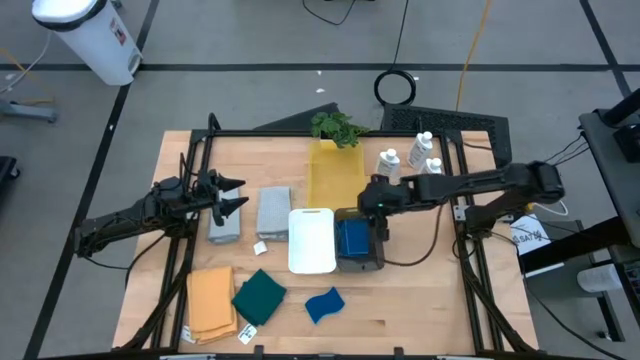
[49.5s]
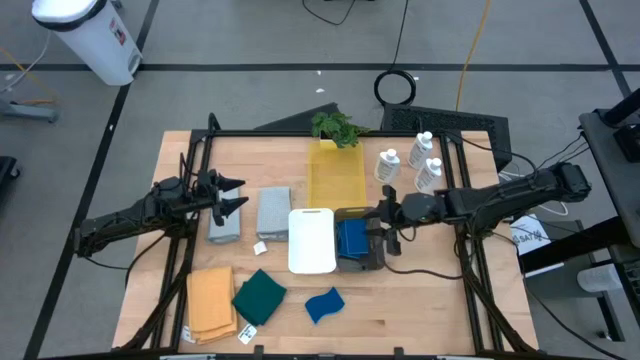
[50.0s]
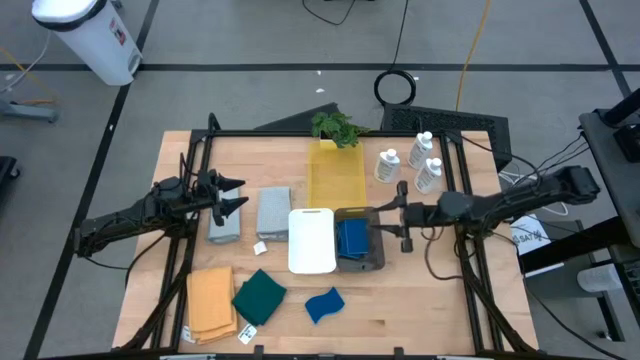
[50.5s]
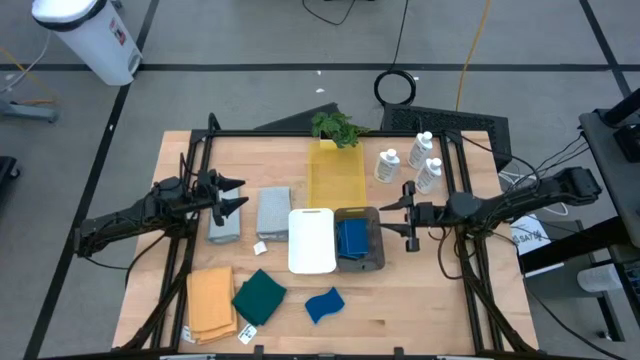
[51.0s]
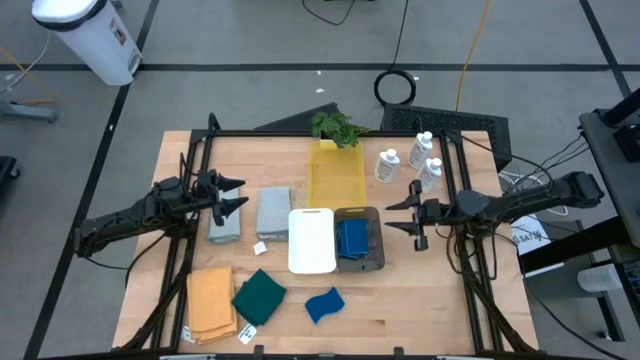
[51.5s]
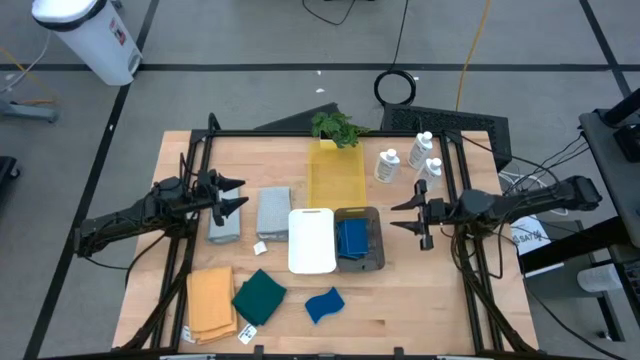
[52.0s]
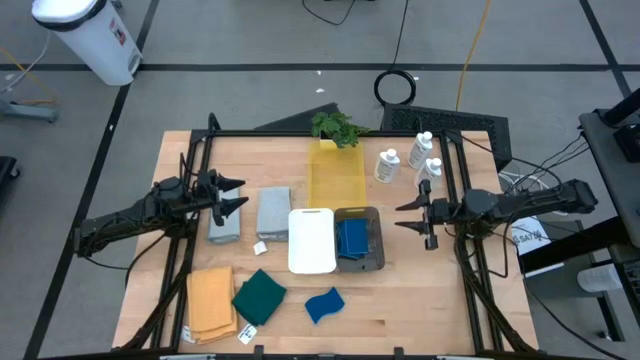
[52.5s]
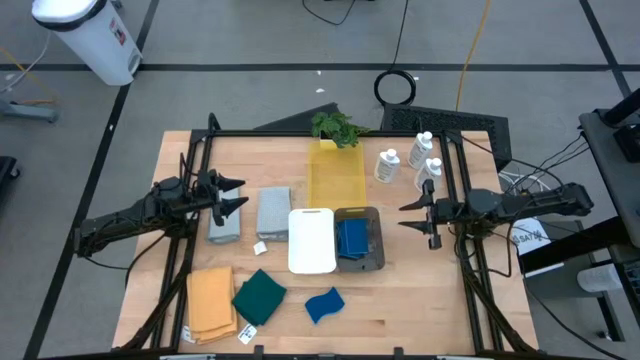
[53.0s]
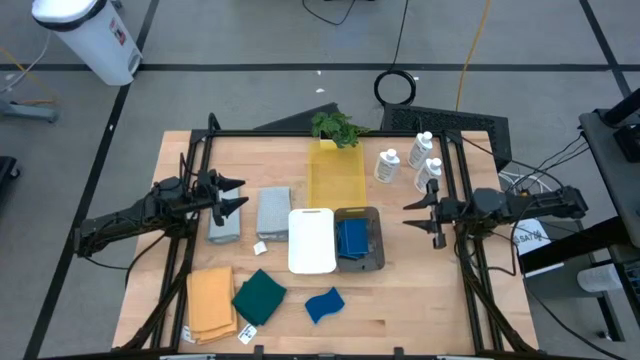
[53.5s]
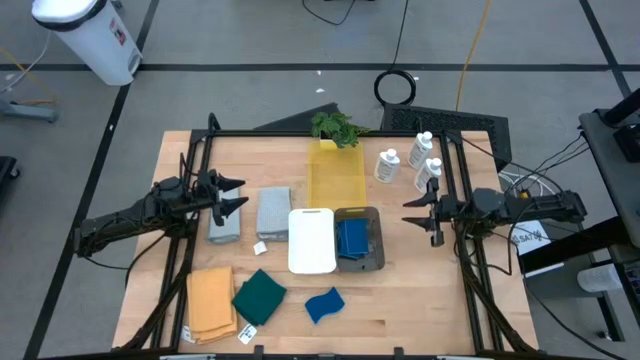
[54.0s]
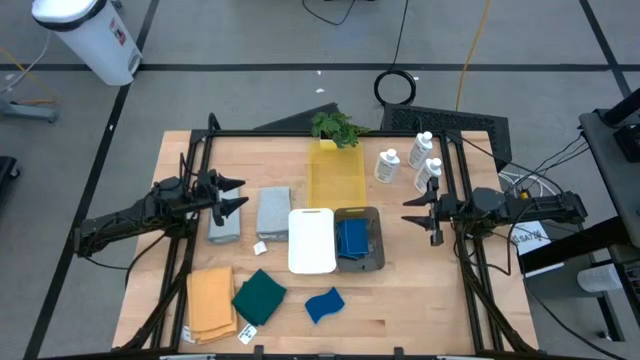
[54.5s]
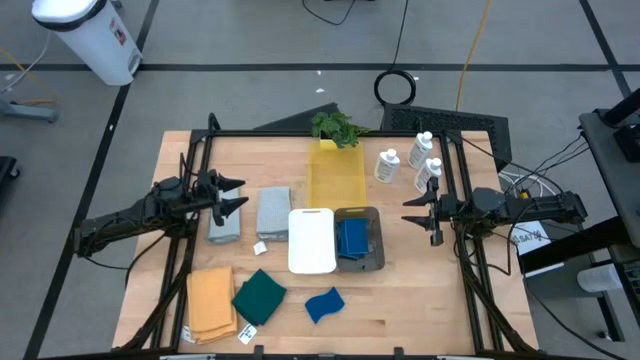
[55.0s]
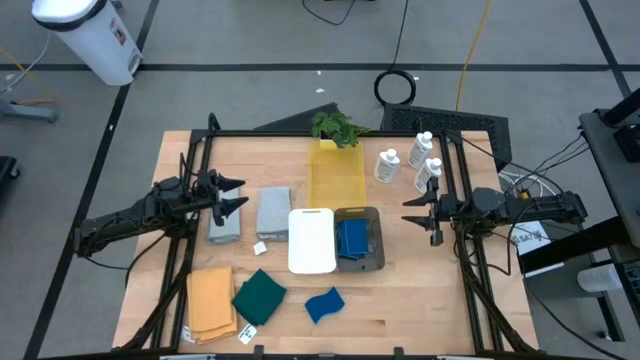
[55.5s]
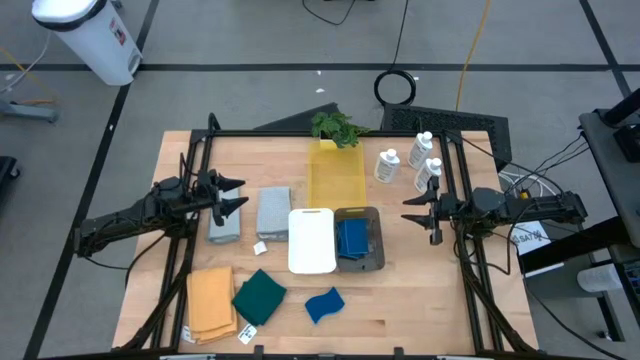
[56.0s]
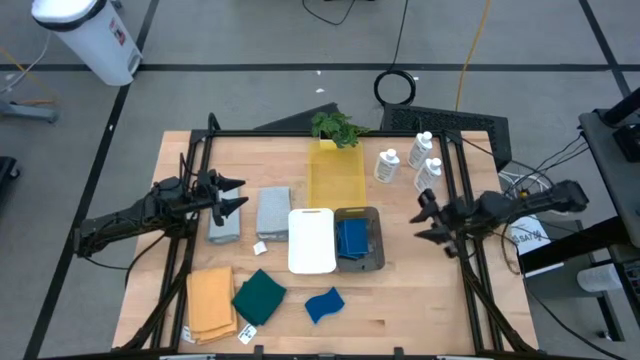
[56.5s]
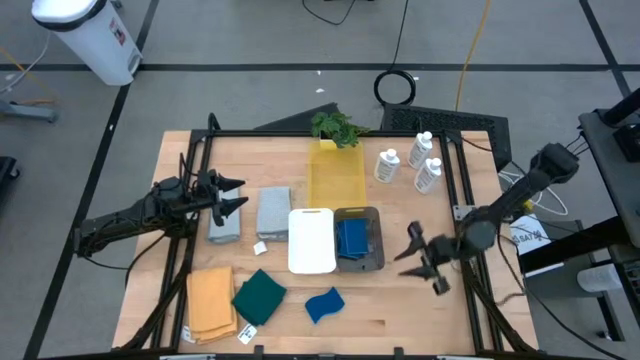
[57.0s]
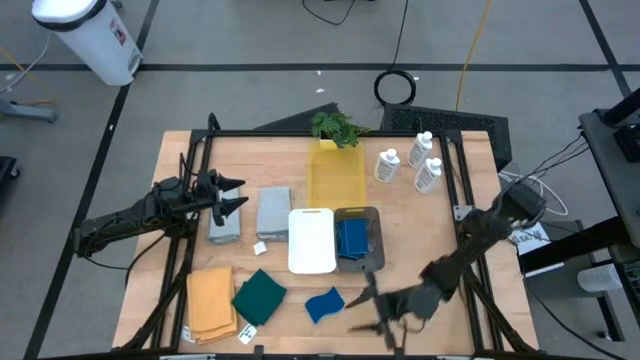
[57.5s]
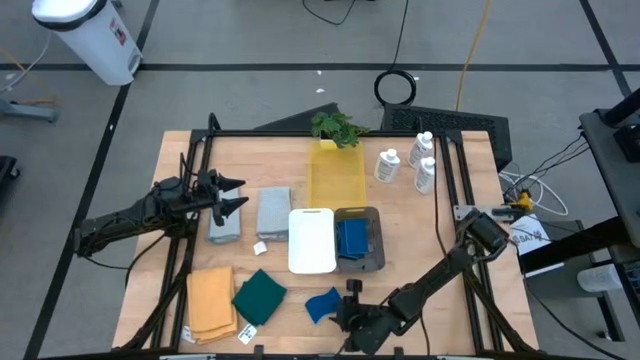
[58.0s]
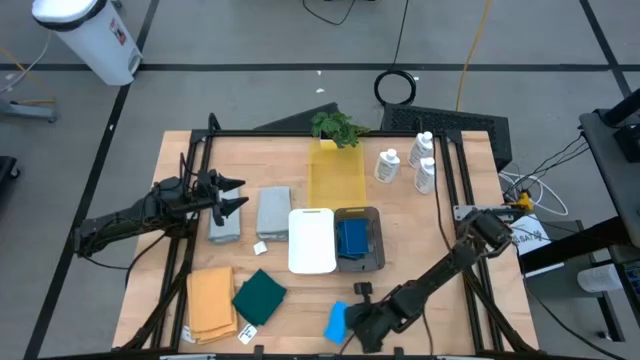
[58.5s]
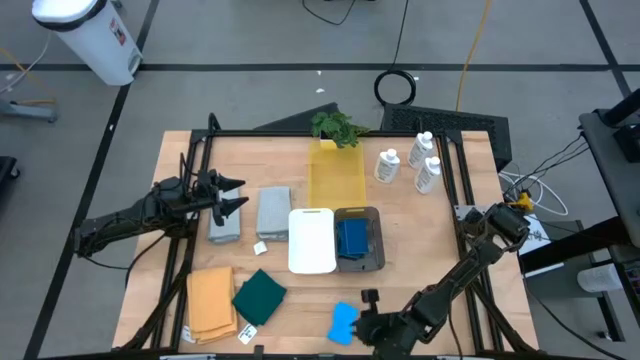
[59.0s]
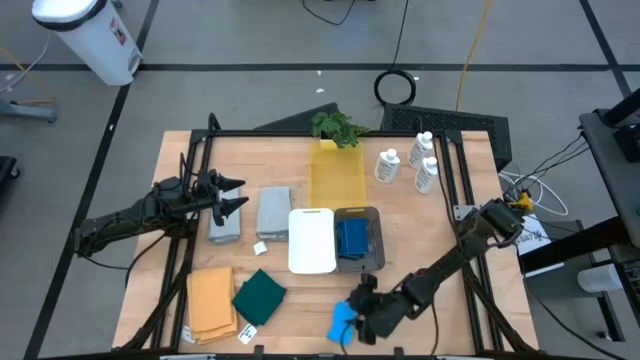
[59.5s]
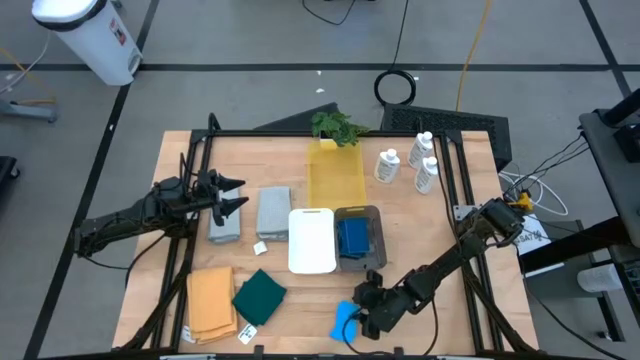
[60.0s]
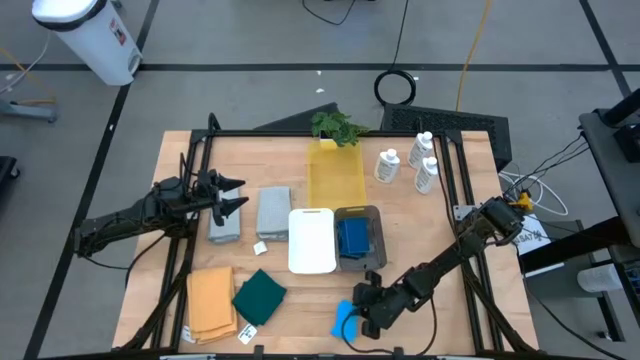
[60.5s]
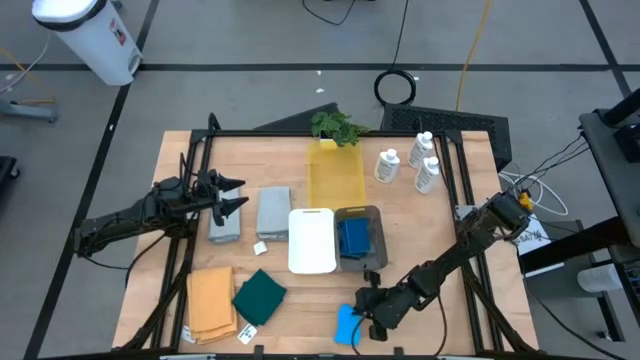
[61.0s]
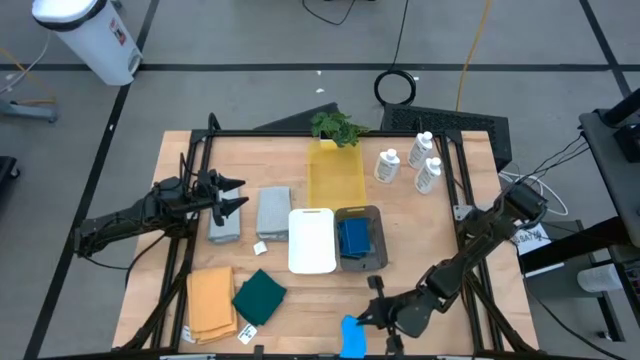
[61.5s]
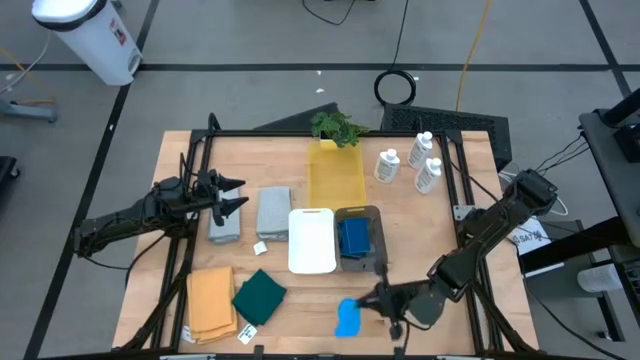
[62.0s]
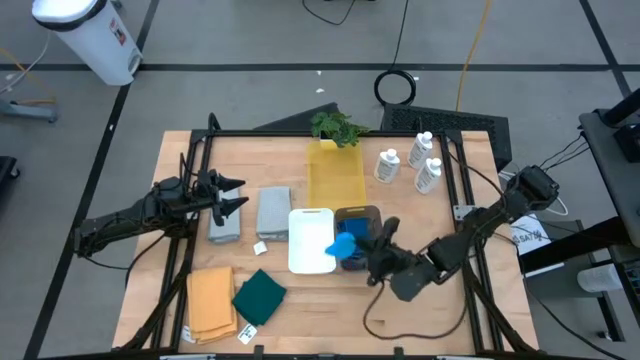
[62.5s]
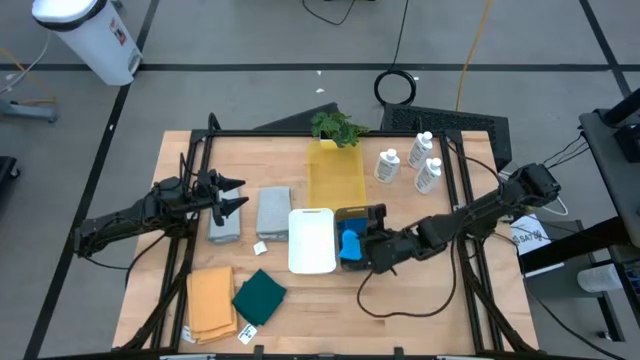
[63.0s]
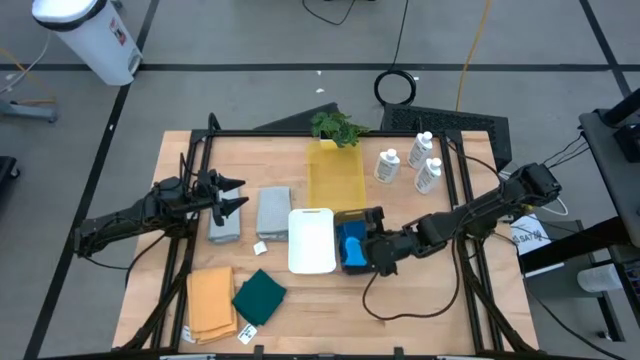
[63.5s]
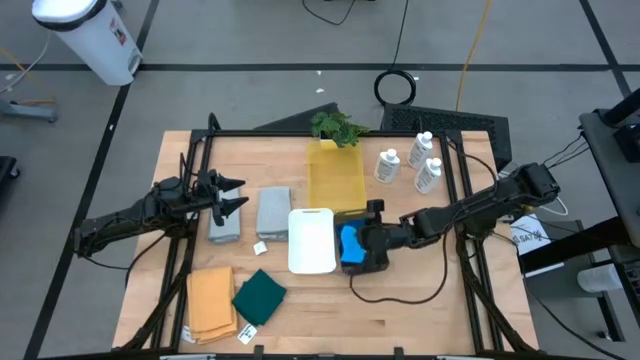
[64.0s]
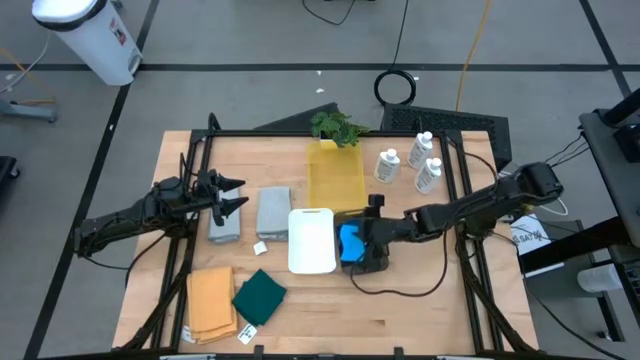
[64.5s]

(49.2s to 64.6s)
Task: Pick & Place Kitchen Items
Put the sponge wipe into the black bin

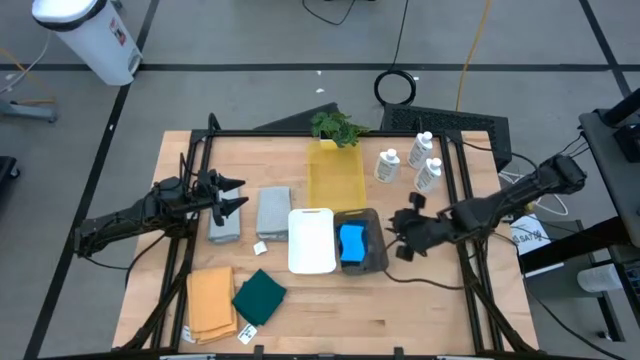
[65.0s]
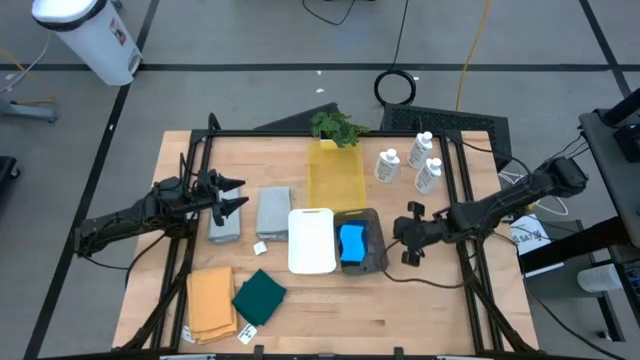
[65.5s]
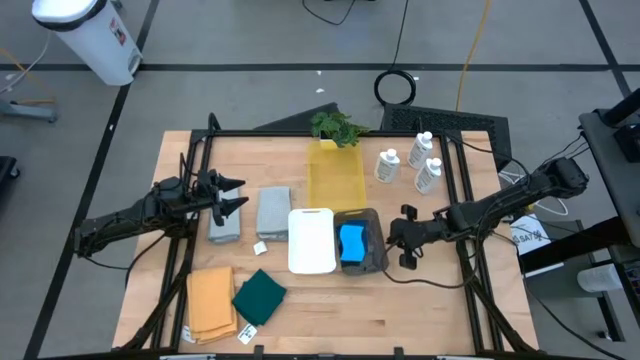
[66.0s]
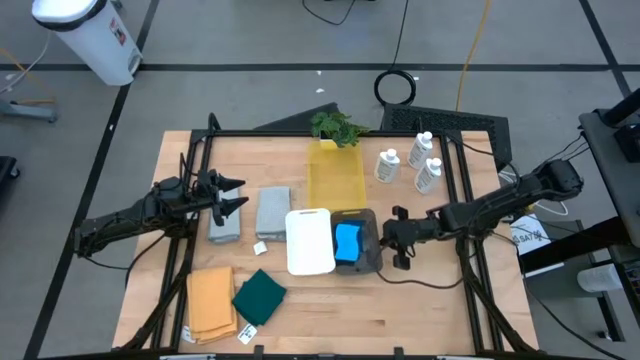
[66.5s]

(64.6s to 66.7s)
Adjust the black bin on the table

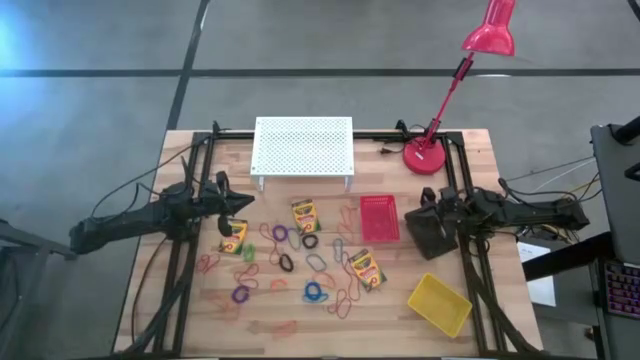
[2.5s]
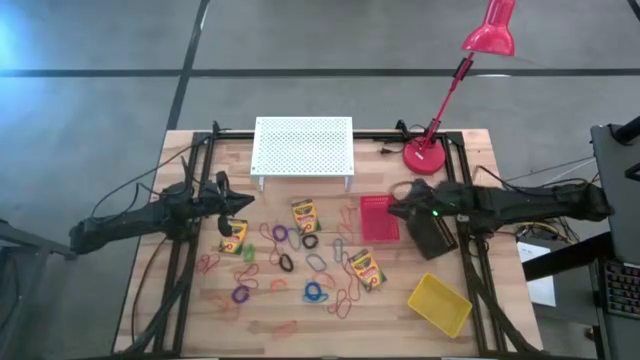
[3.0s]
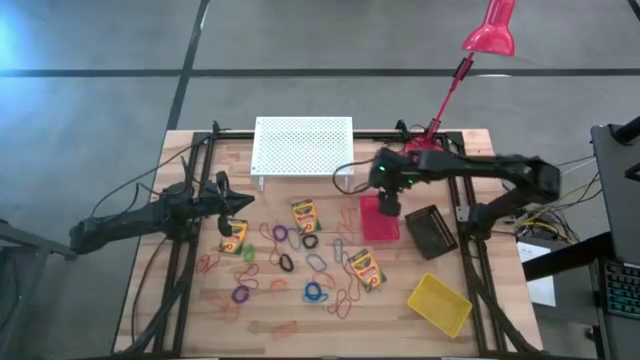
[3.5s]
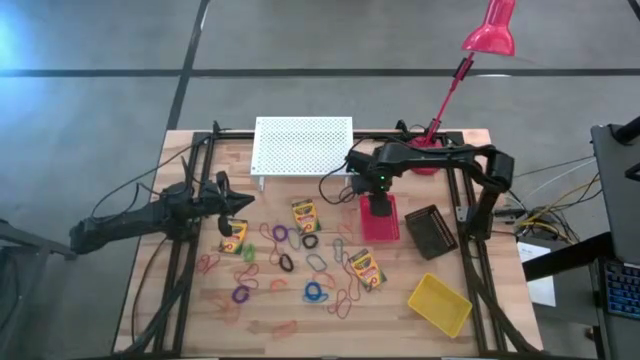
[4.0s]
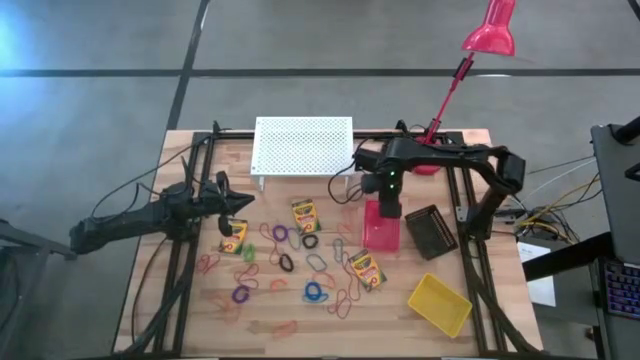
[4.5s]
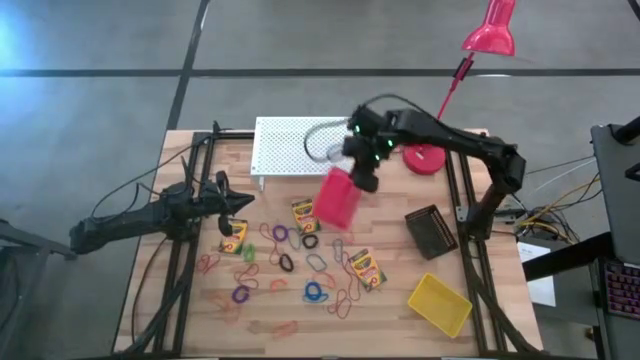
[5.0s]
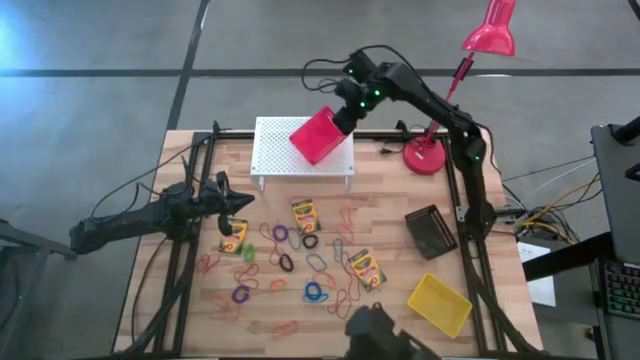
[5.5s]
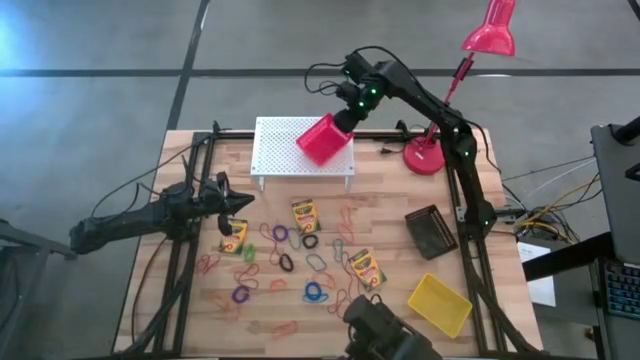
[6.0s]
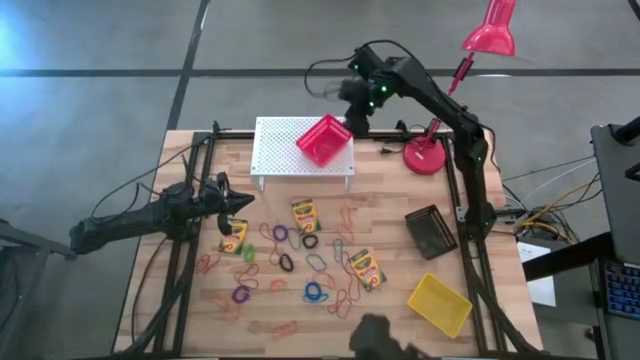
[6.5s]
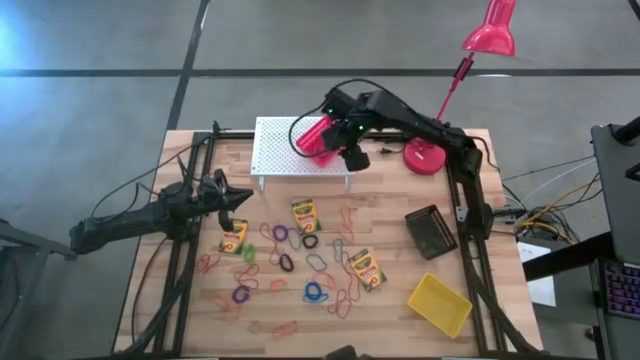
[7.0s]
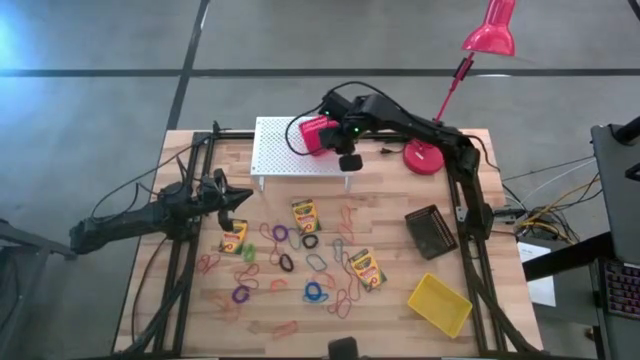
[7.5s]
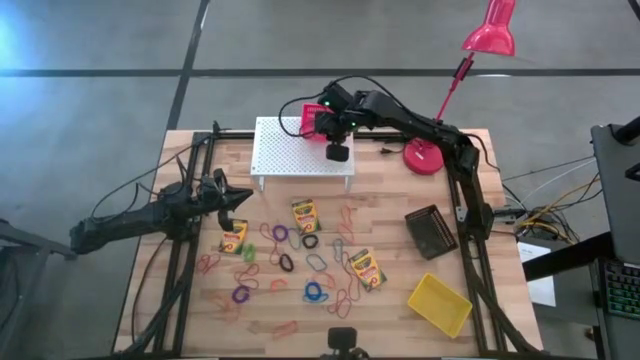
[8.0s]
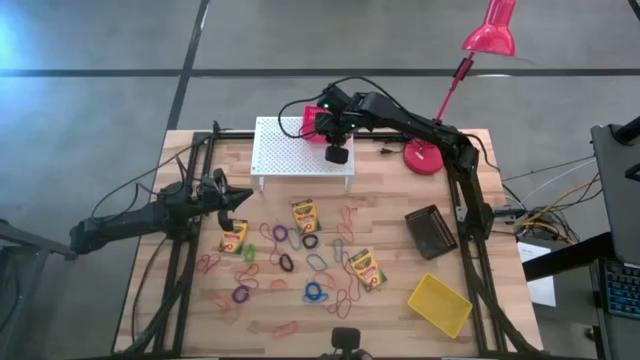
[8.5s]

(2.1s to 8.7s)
Task: Pick & Place Office Desk Supplies
Put the red bin on the shelf
